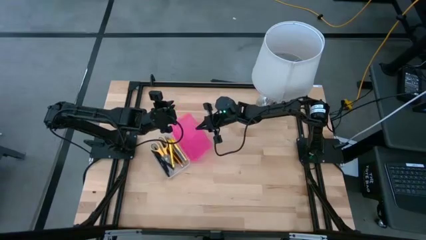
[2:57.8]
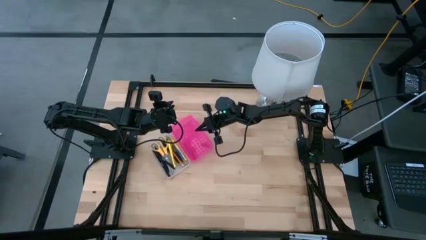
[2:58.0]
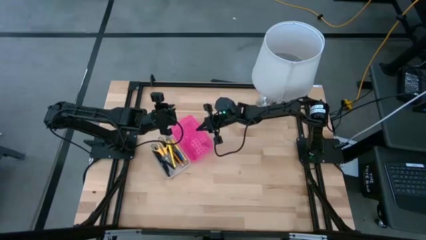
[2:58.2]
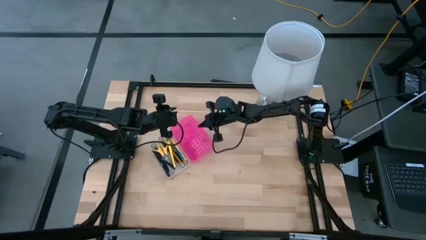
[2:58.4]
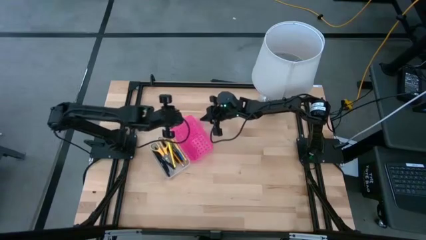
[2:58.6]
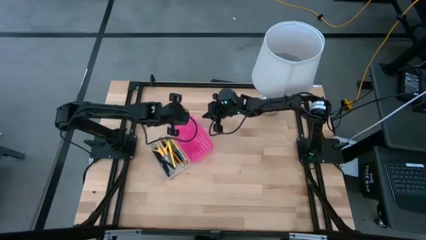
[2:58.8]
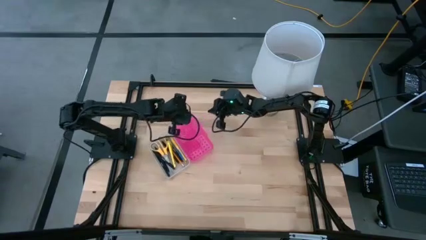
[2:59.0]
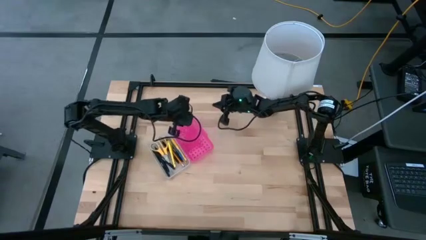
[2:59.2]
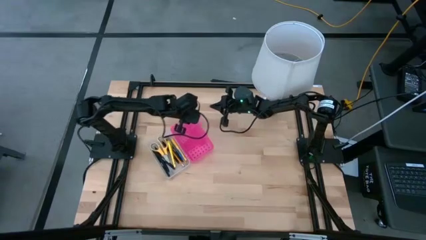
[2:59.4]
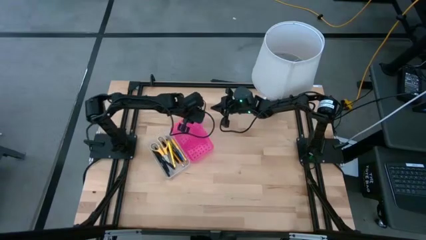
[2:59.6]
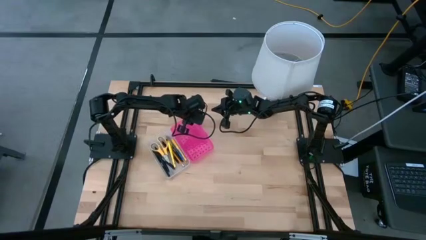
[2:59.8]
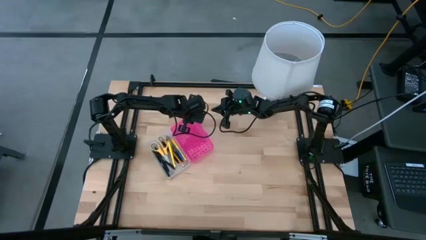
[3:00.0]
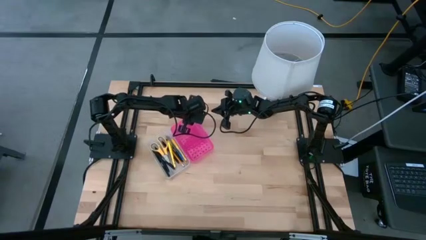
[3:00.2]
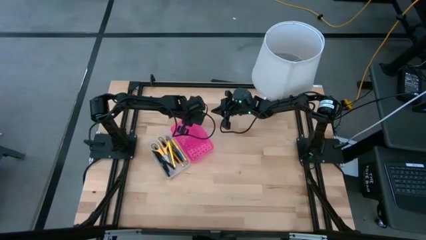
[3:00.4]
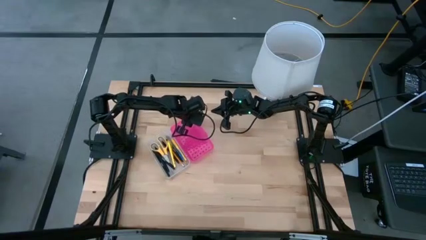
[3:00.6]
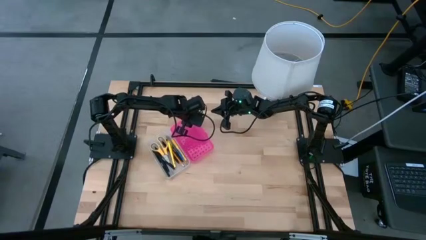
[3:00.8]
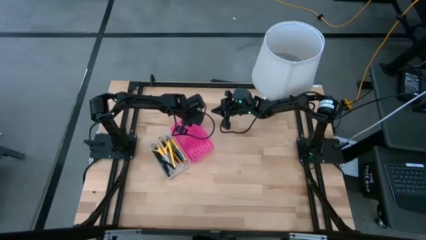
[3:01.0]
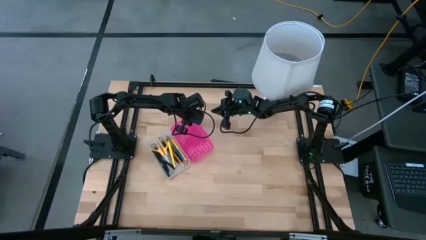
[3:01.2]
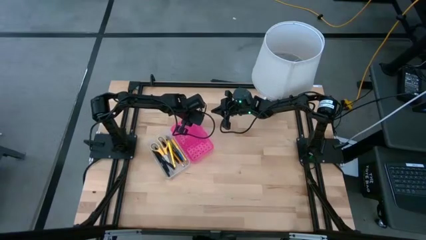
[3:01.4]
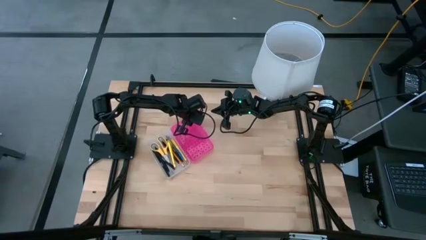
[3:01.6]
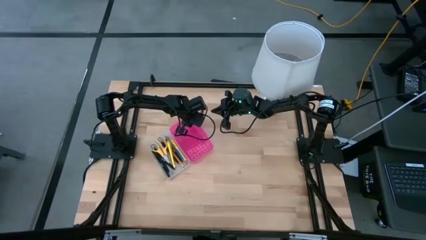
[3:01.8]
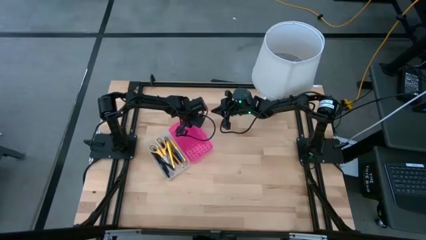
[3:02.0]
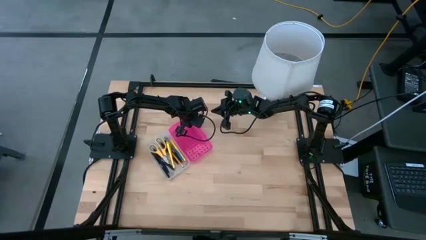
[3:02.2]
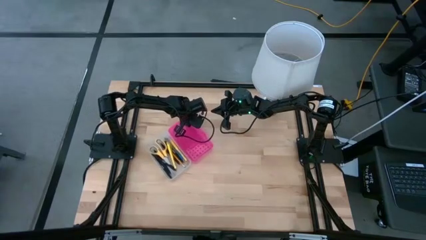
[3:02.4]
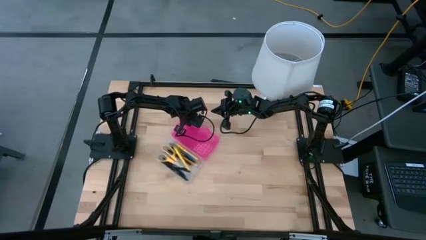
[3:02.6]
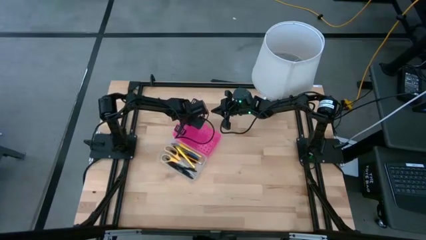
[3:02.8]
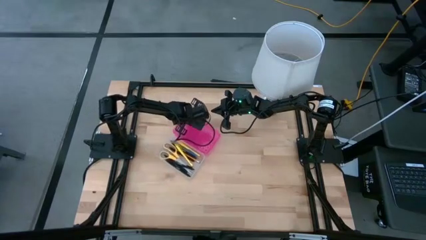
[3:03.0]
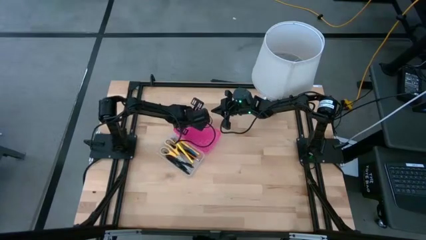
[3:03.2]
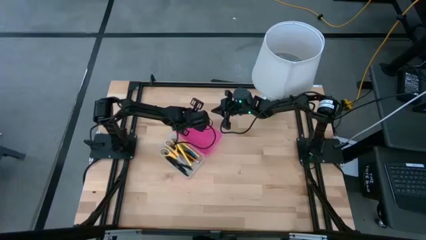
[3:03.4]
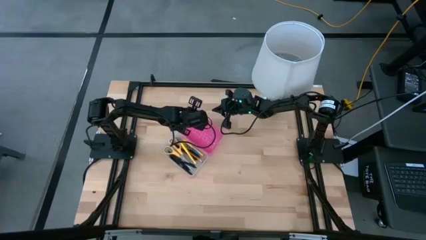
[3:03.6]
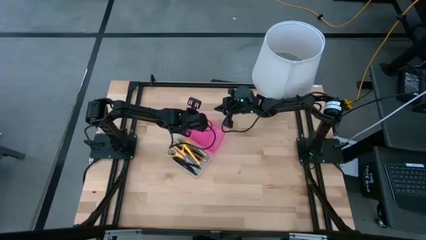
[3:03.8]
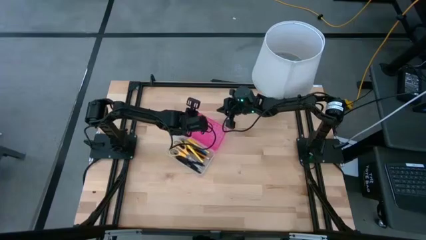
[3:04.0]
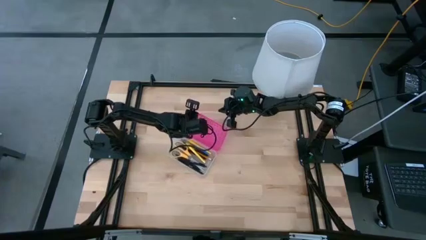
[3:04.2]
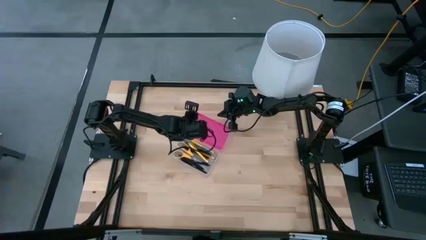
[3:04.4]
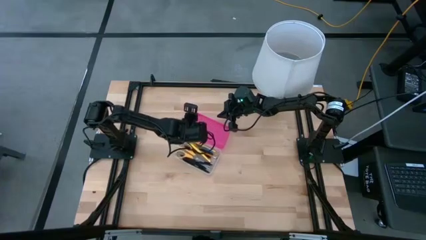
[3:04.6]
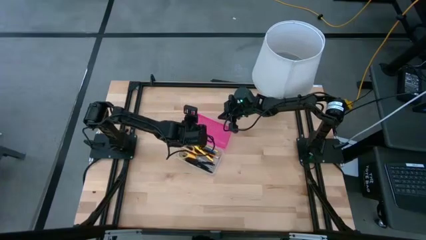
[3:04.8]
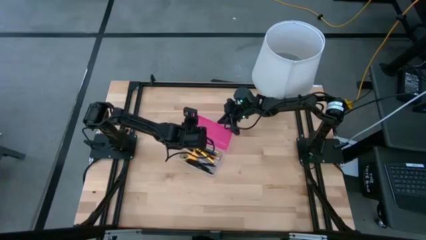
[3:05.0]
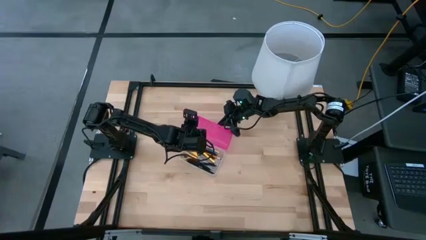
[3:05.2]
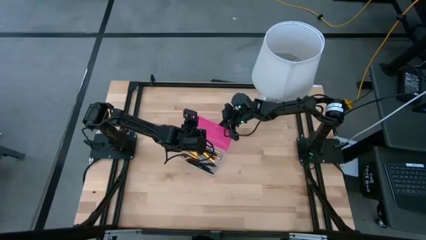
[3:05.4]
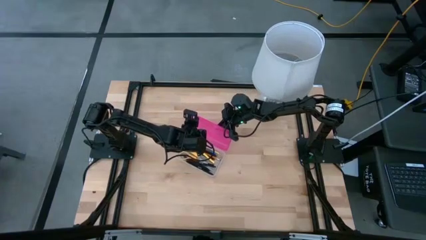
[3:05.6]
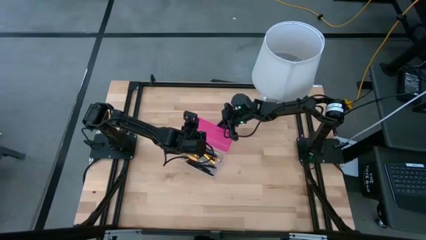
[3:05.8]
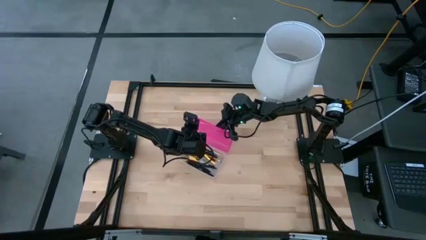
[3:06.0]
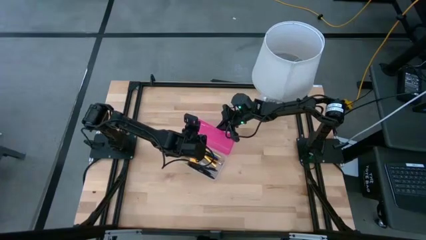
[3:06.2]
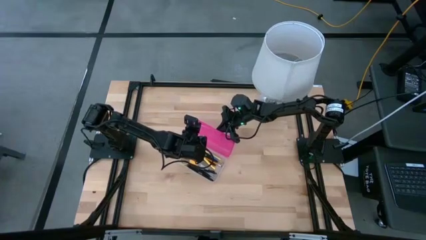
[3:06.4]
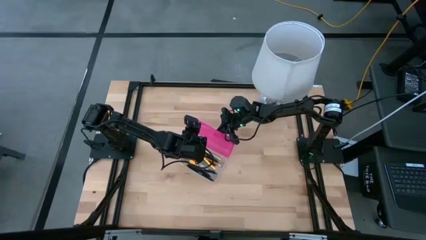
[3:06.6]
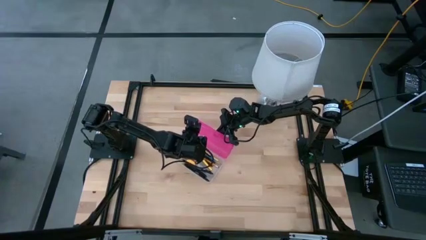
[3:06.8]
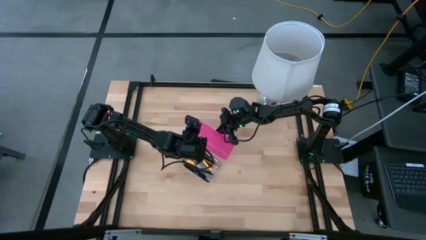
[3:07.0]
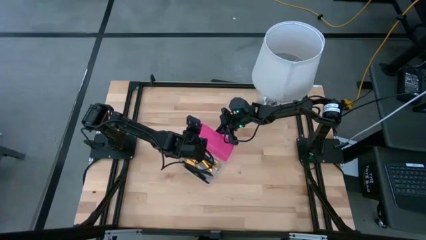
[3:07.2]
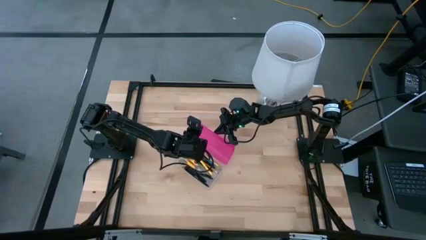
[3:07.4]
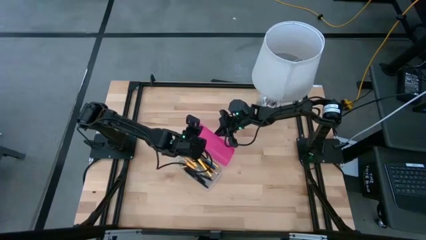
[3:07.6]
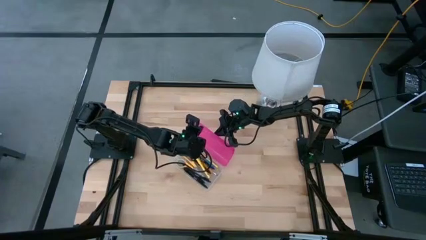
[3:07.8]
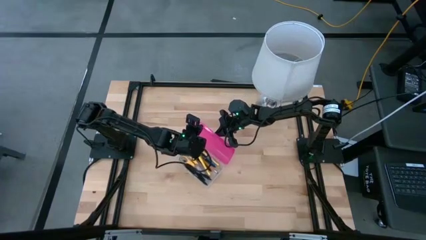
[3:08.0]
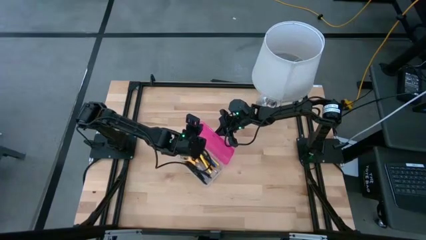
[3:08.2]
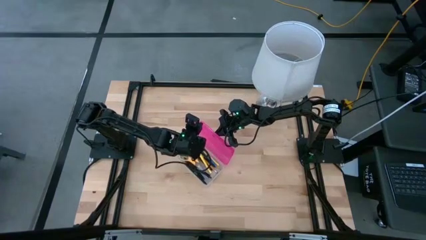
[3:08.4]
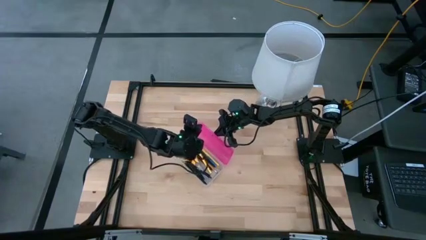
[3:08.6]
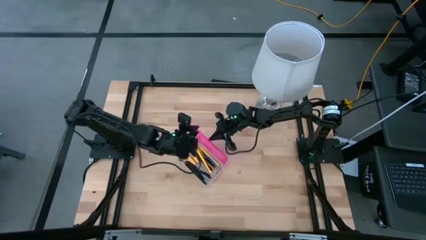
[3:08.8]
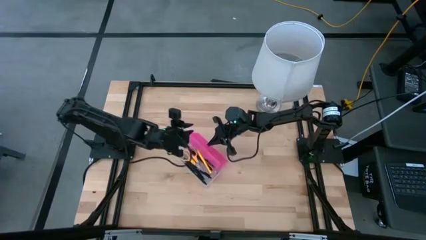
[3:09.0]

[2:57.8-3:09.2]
Task: Pick & place school supplies into a supply box
Close the pink supply box

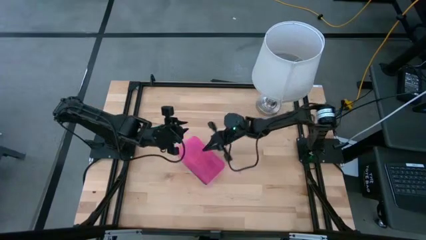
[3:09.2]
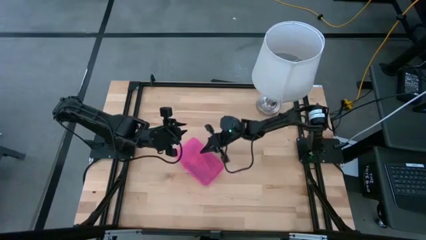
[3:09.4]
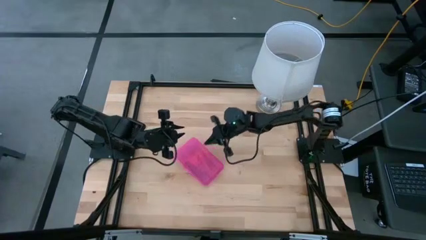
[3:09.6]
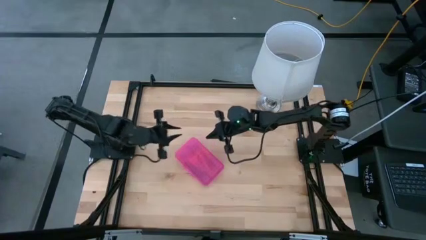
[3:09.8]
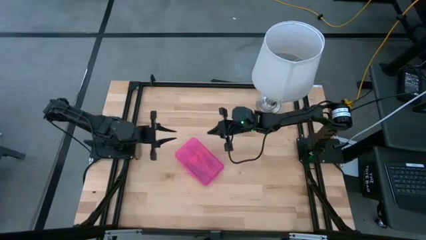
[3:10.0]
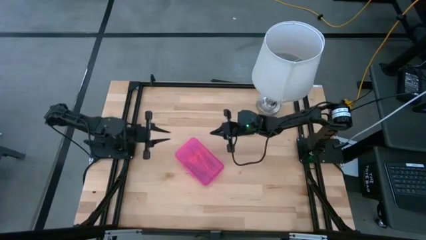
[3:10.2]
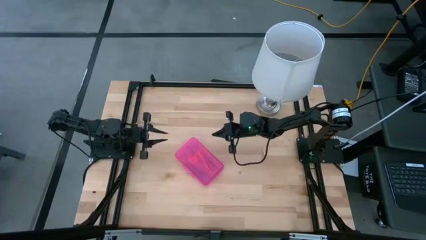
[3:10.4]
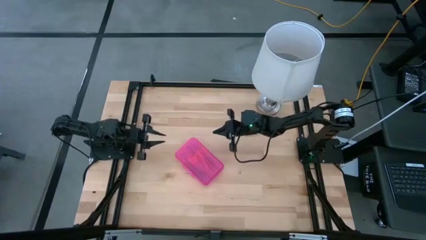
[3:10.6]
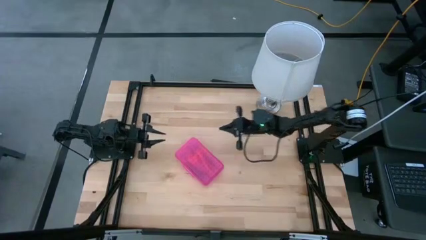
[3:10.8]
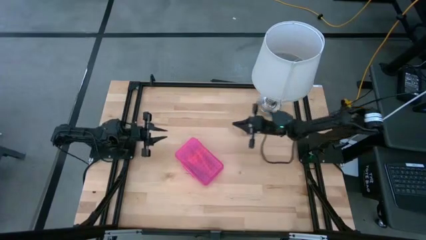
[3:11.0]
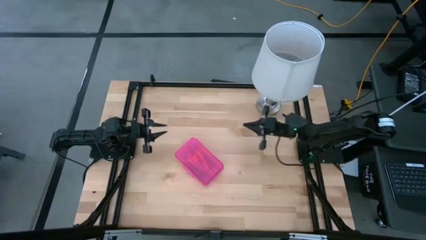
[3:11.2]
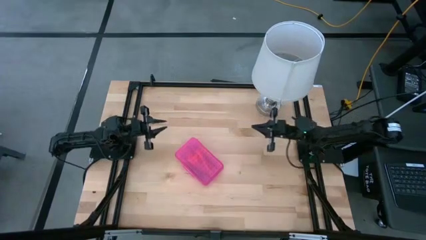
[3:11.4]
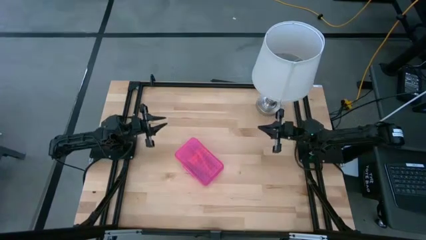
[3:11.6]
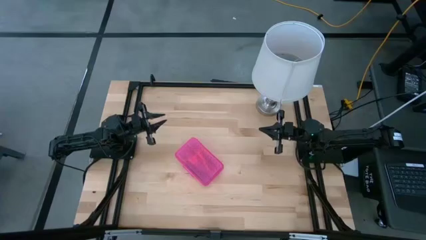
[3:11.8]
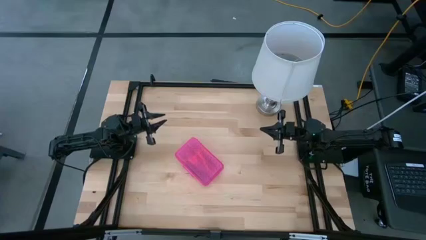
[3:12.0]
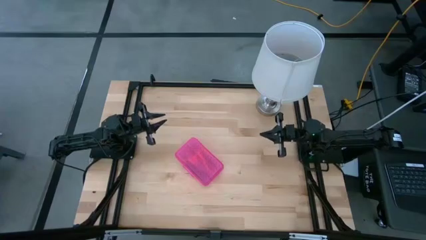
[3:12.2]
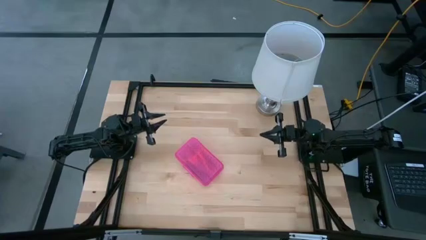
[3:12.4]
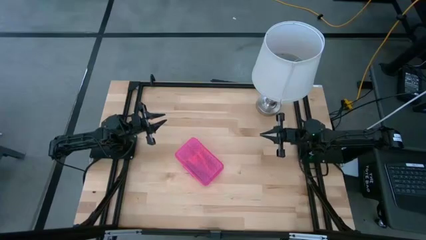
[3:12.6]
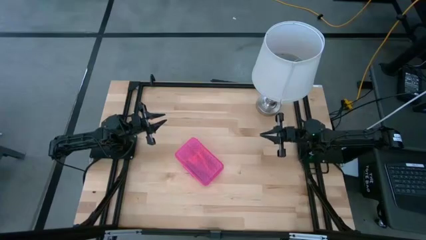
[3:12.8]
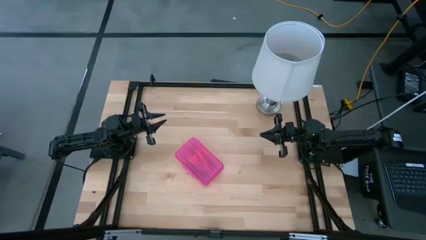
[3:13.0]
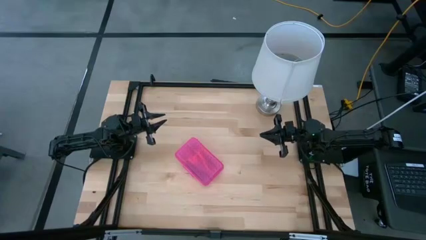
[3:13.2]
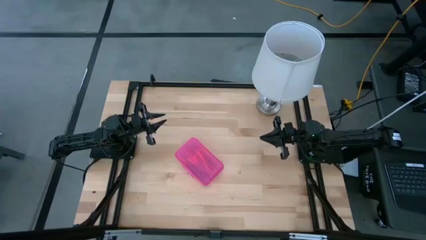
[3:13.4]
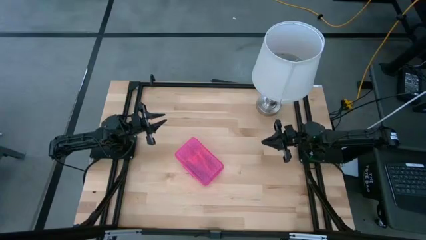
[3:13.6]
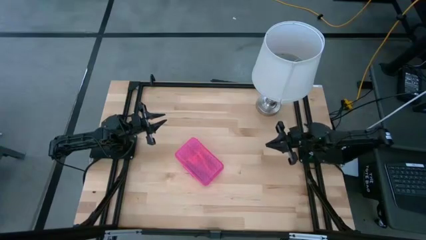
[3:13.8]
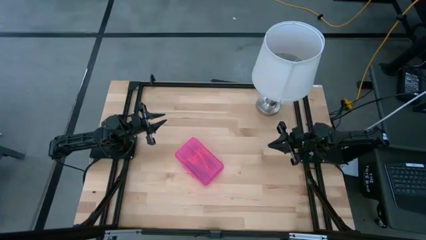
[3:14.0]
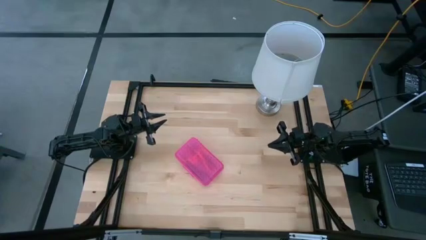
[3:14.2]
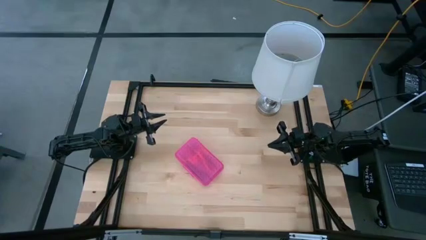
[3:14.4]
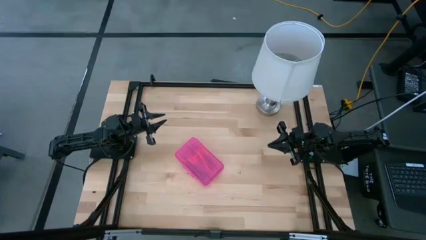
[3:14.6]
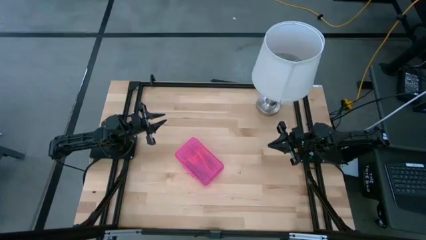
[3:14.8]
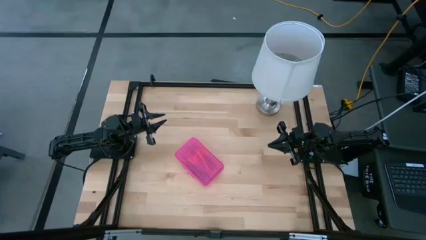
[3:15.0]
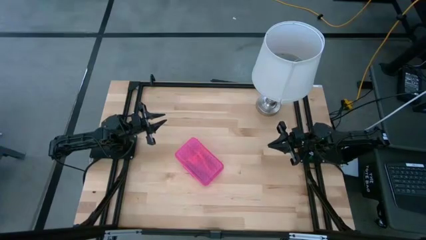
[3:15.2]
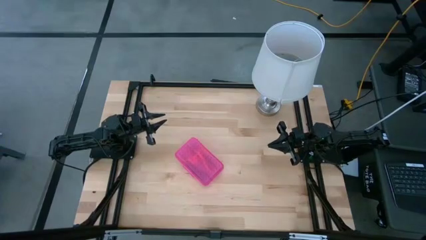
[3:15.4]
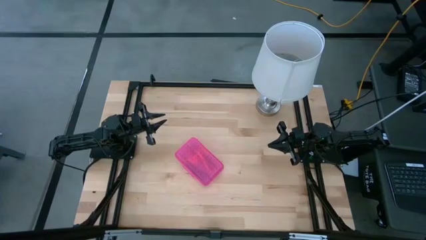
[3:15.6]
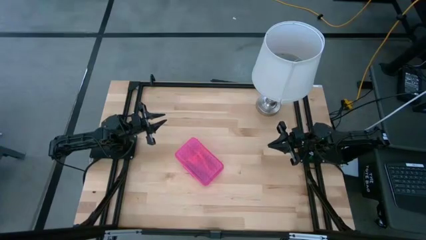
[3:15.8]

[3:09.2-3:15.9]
Return to Home Position
